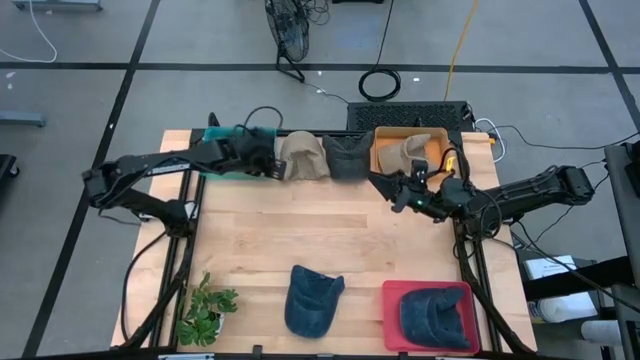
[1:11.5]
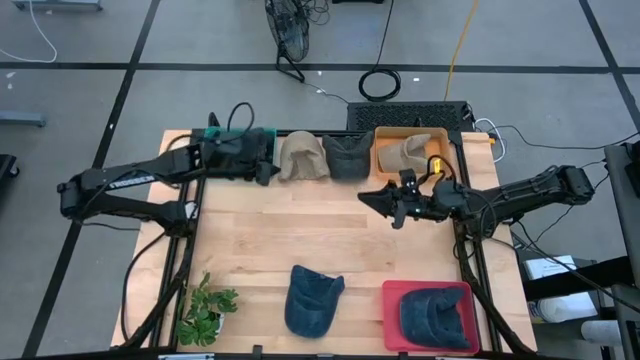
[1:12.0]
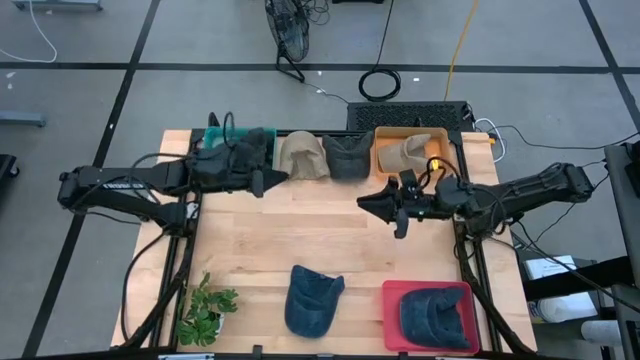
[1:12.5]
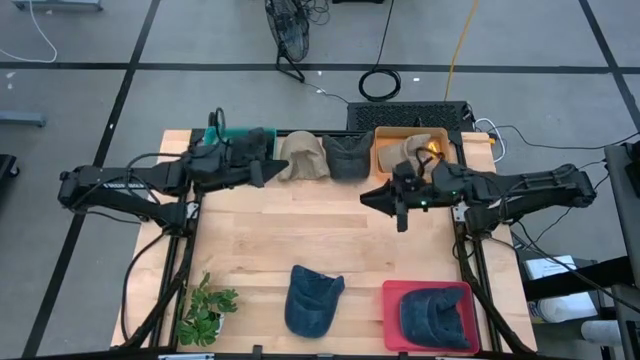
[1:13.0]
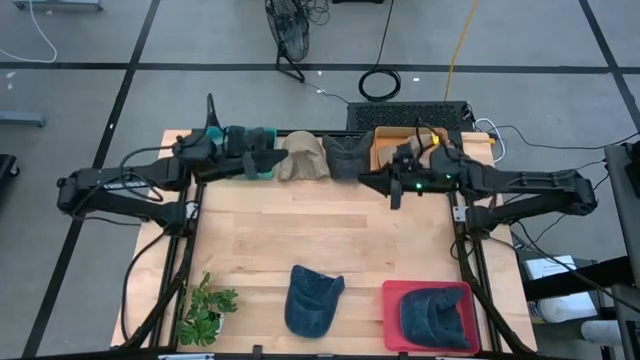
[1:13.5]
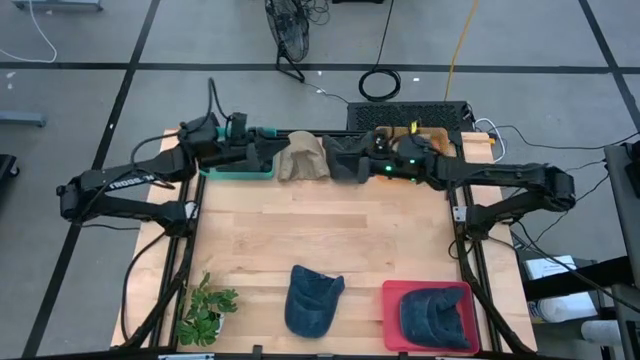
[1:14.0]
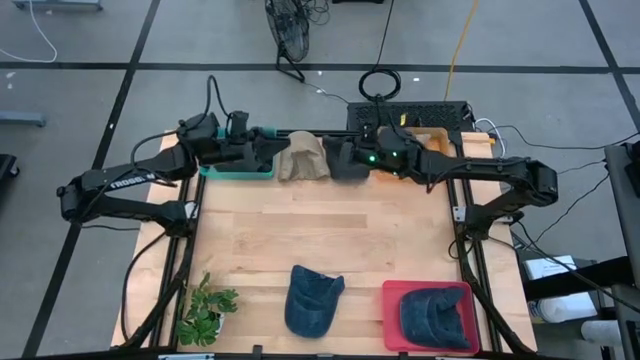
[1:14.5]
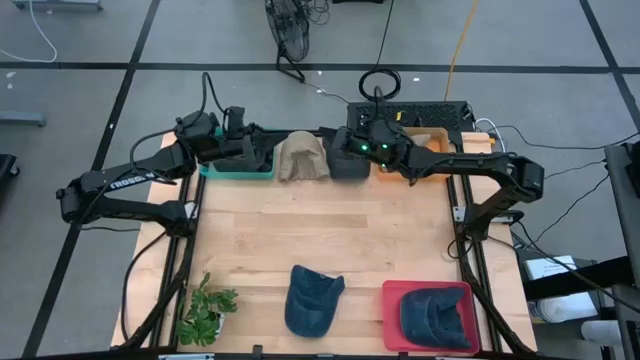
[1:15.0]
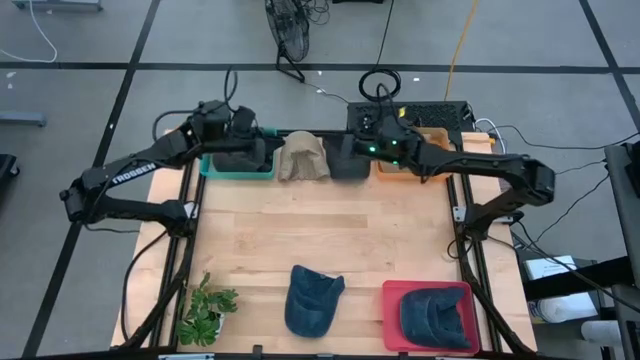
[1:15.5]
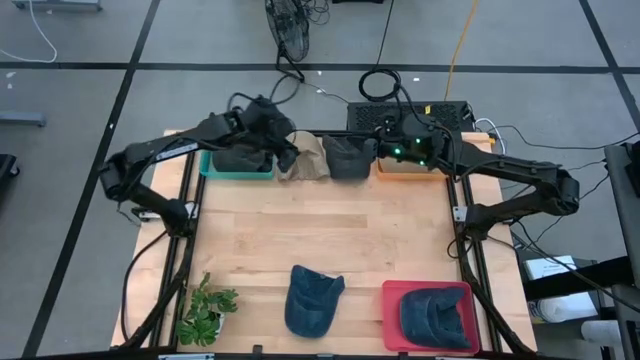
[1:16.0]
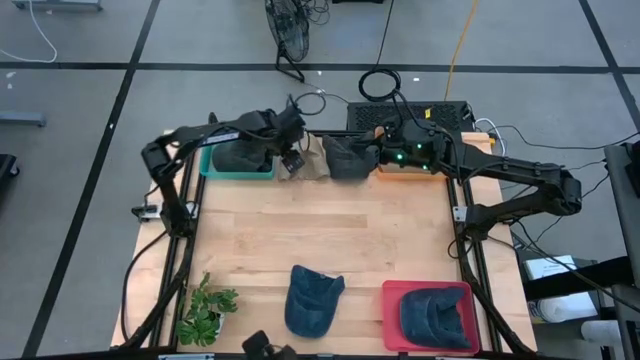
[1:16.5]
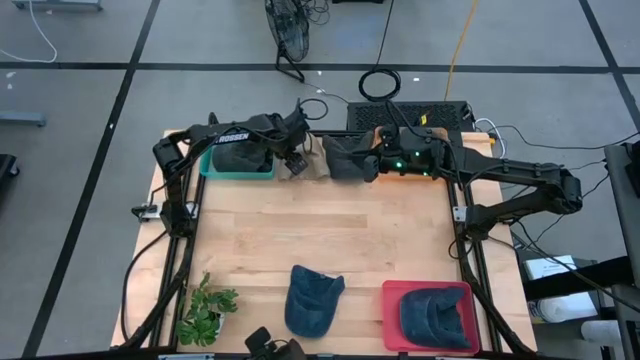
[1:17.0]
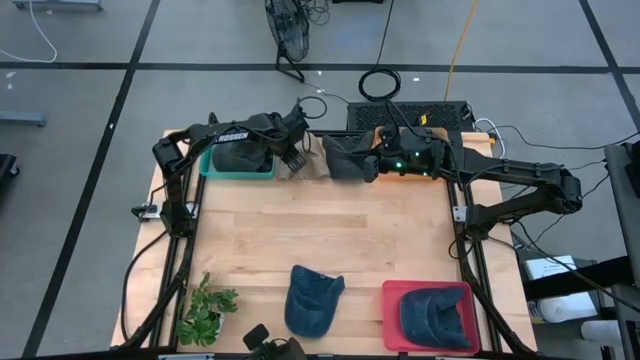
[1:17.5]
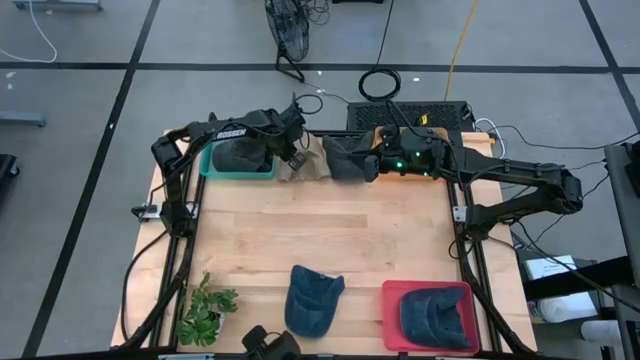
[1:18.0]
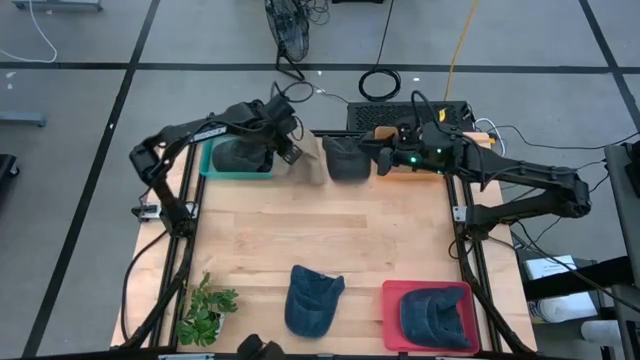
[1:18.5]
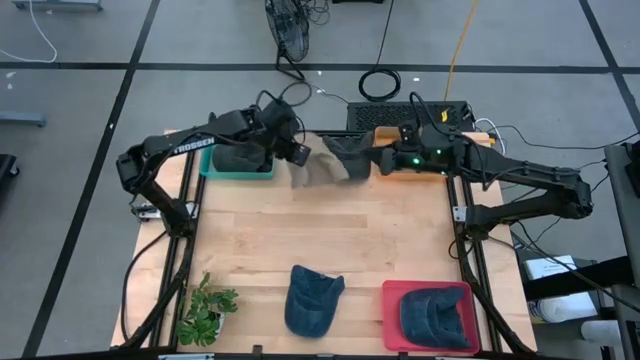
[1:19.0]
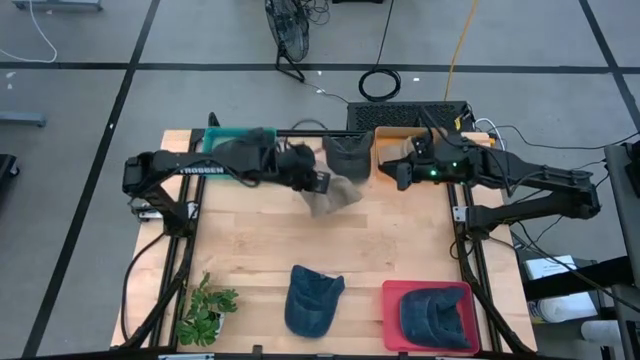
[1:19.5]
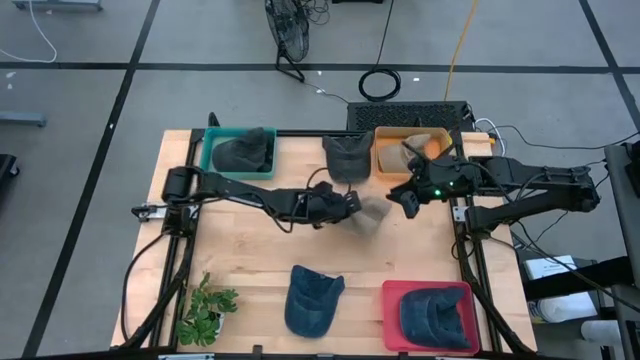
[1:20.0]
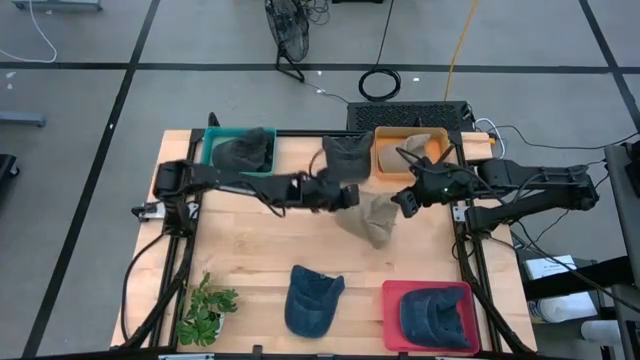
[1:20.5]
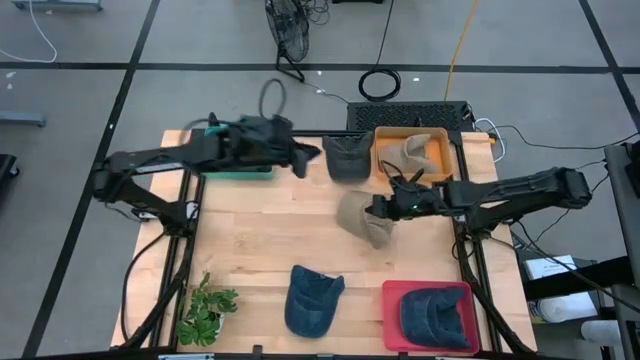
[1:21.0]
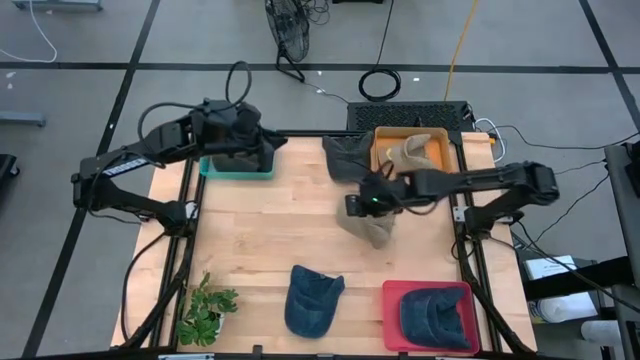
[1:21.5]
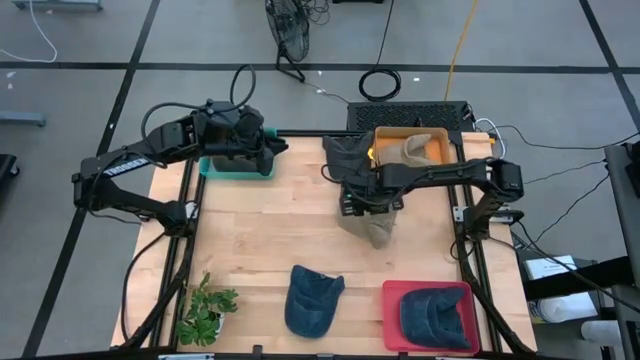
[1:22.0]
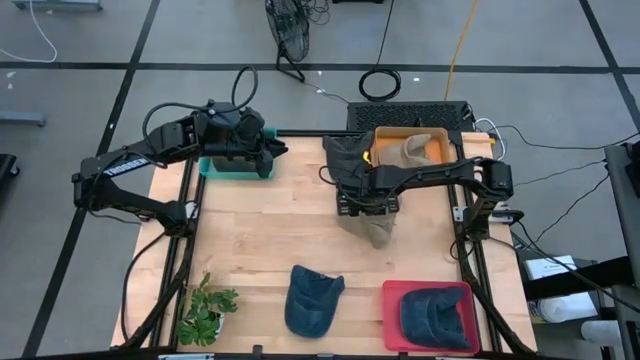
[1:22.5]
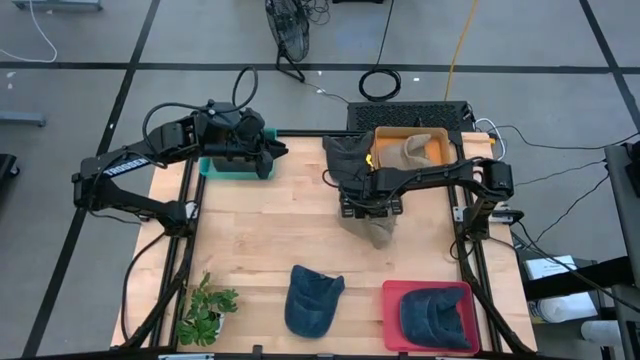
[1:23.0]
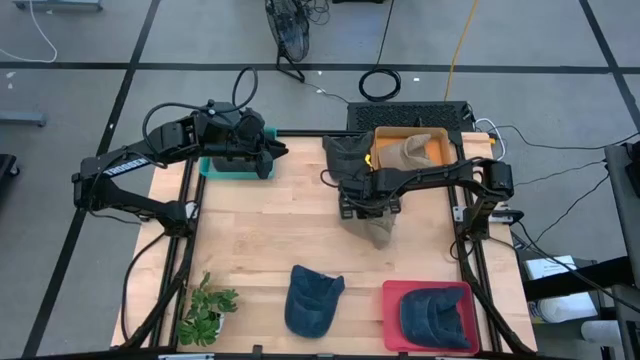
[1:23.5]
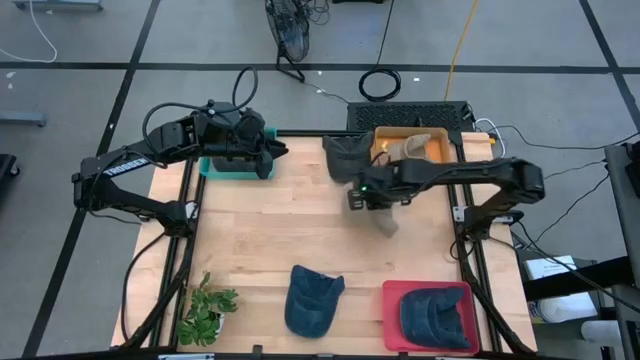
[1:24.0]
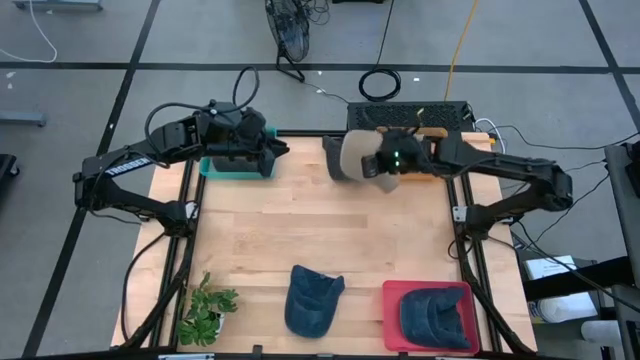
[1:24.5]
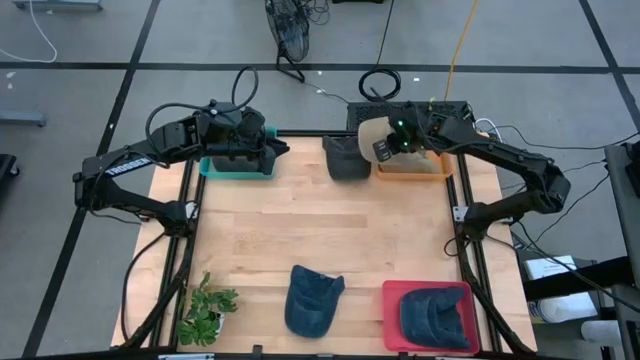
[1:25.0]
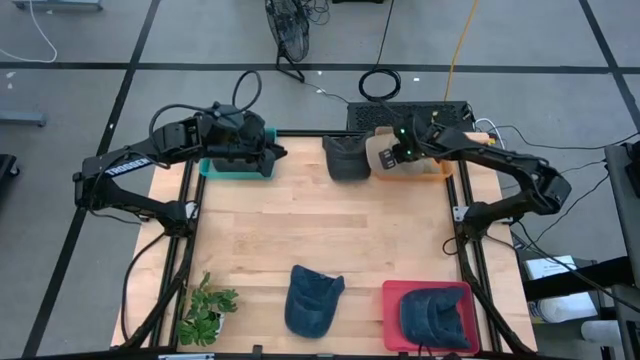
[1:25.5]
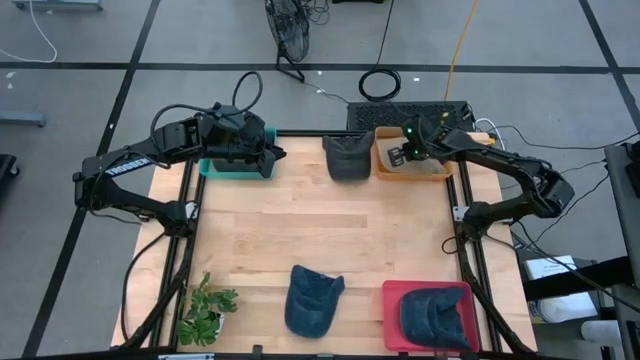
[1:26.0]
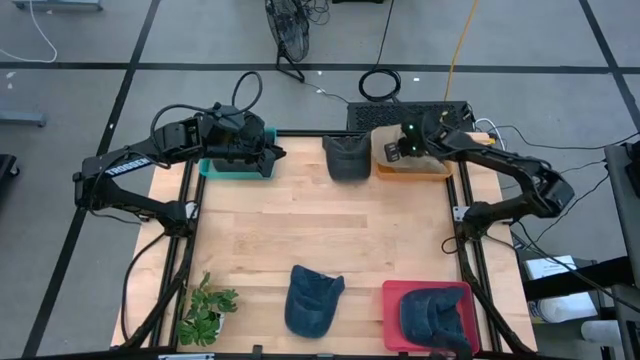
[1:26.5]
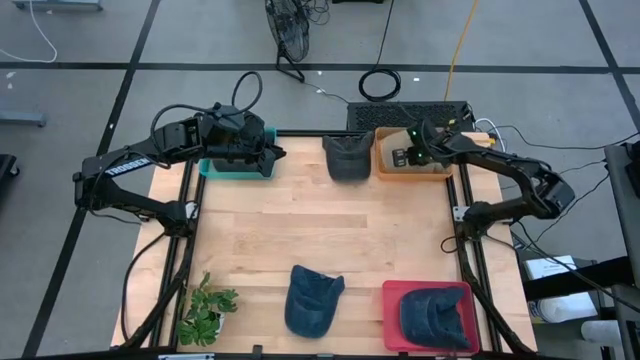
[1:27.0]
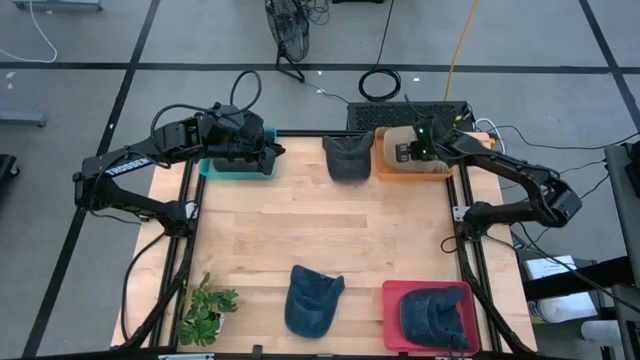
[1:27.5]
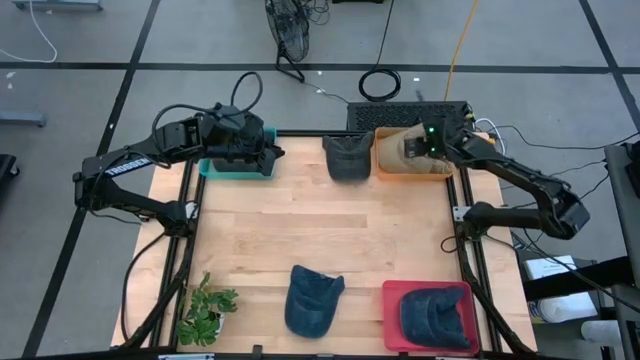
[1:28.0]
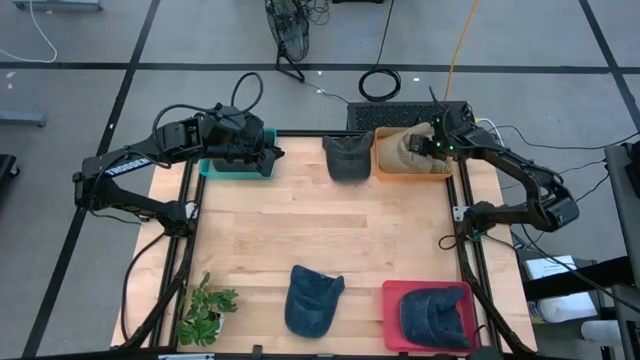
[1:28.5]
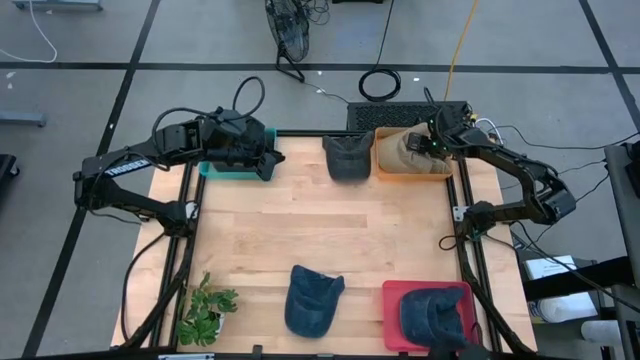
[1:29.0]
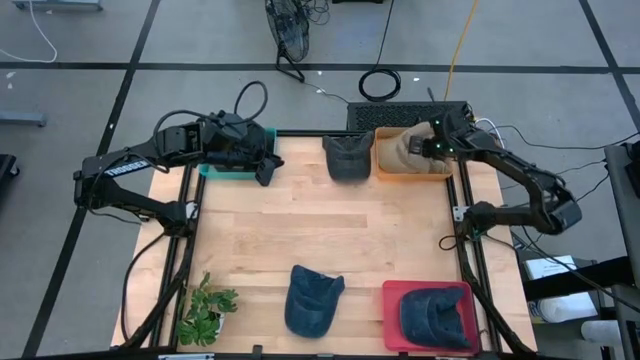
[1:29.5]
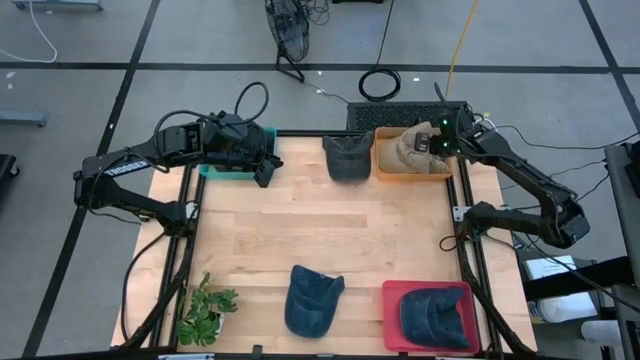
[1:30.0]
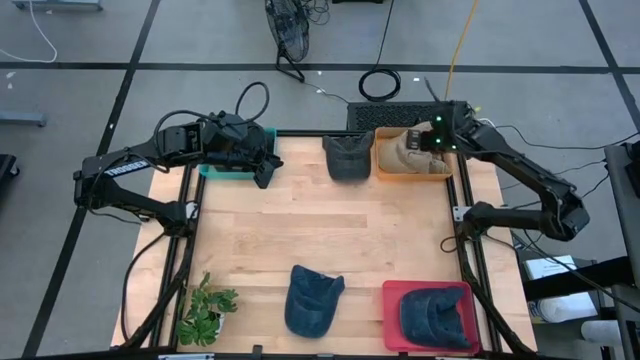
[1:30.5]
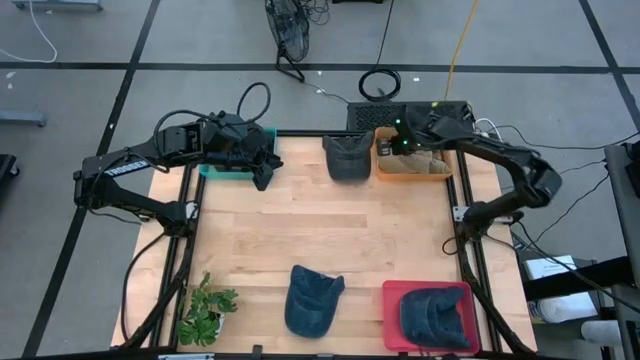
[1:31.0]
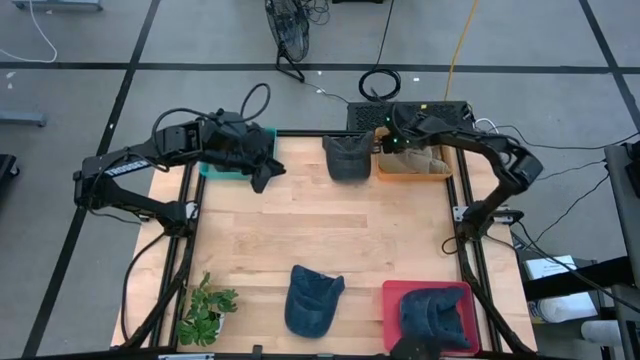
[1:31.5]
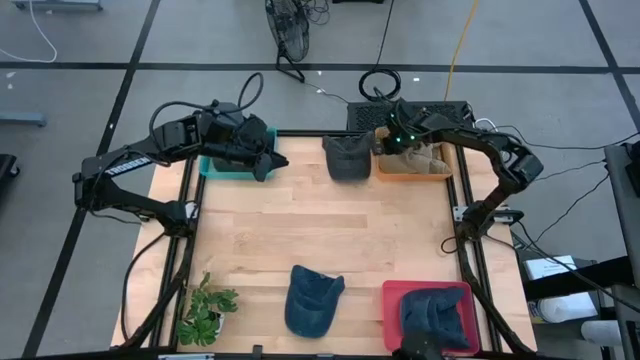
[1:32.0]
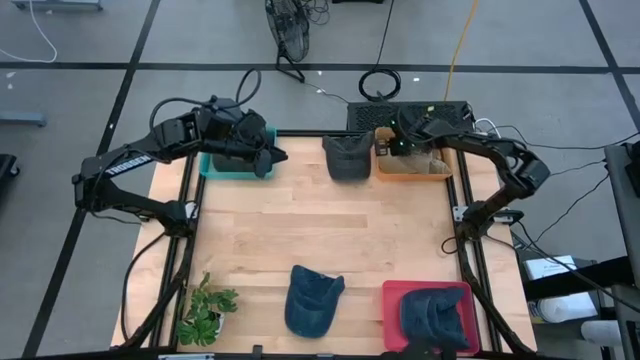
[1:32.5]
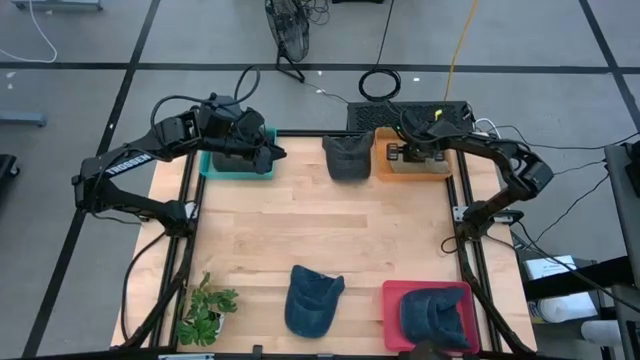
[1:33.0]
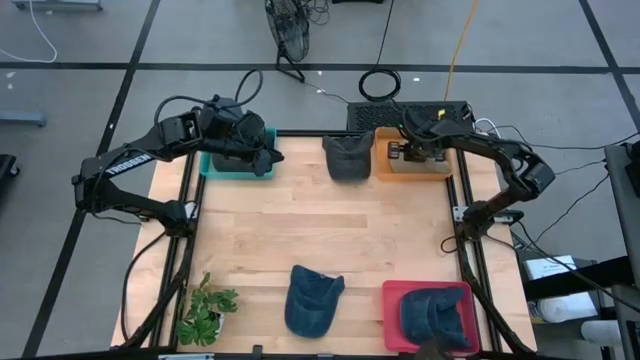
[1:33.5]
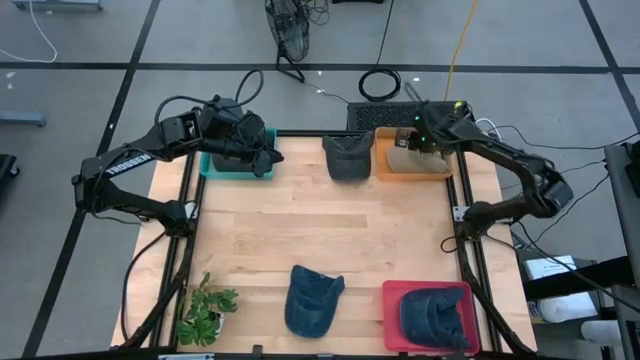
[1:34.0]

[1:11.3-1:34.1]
Task: Pick & Place hat
Put the brown cap into the orange bin
